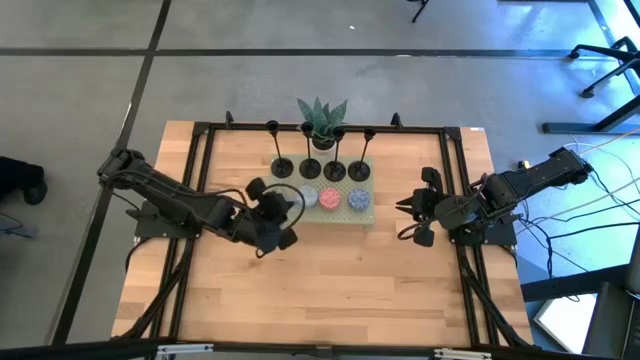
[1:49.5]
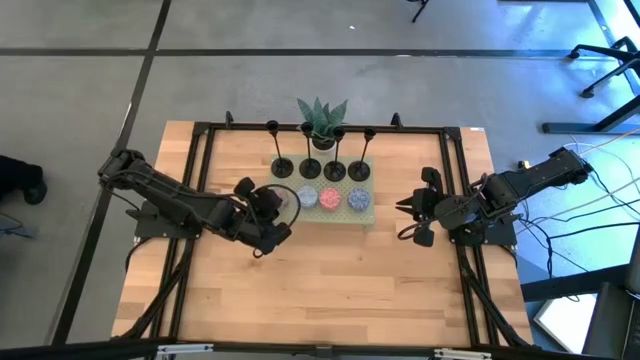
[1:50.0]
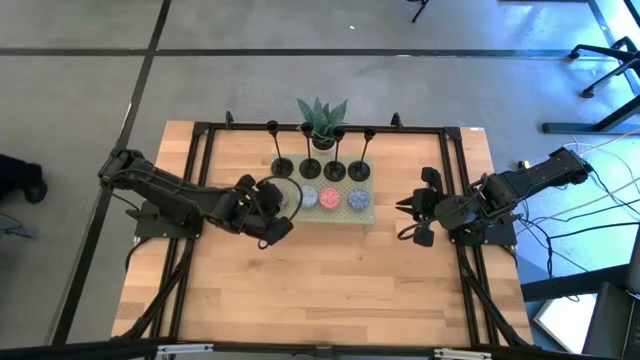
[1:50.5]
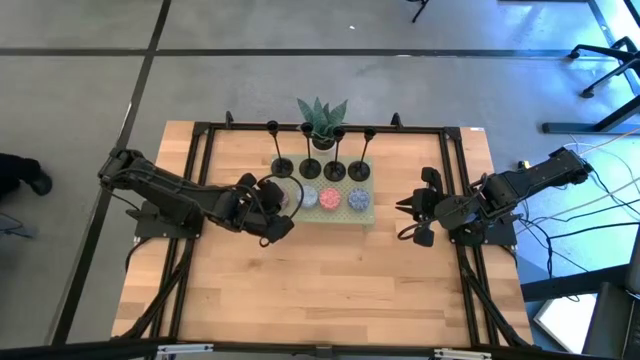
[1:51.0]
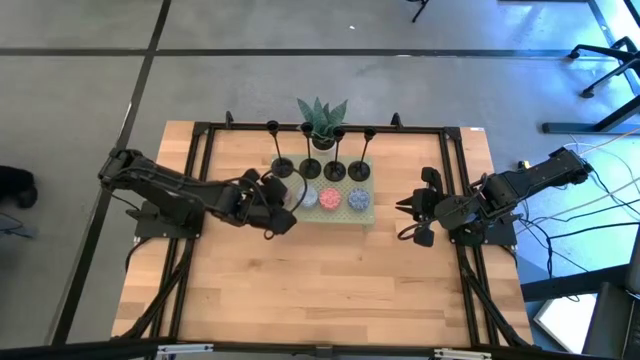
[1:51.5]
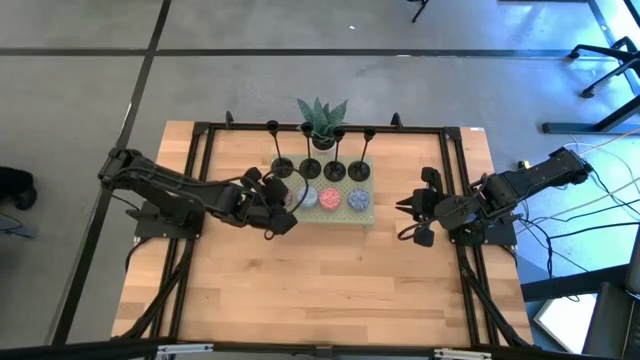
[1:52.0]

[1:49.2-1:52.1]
Task: Pick & Place candle stick holders
Adjust the red scented candle on the shelf

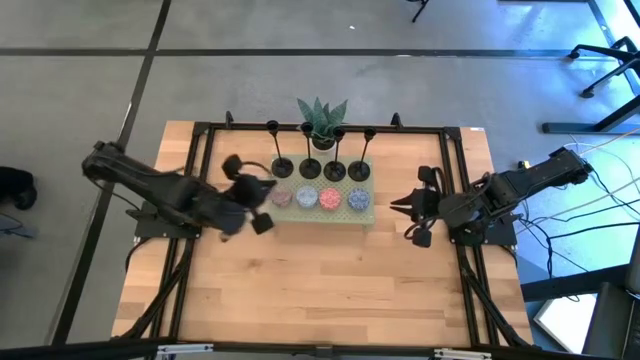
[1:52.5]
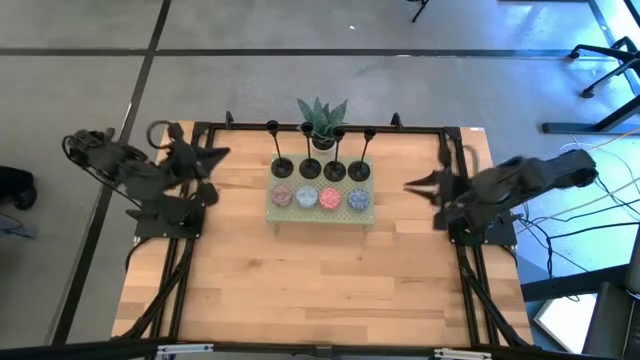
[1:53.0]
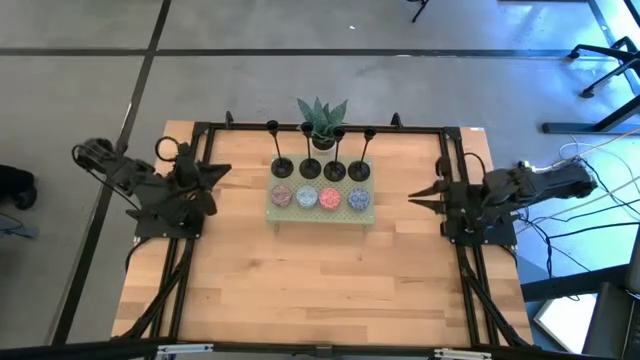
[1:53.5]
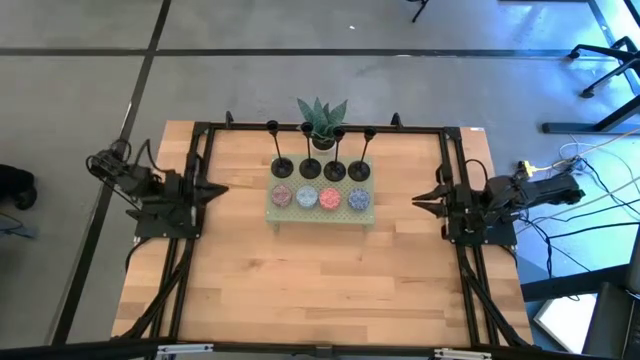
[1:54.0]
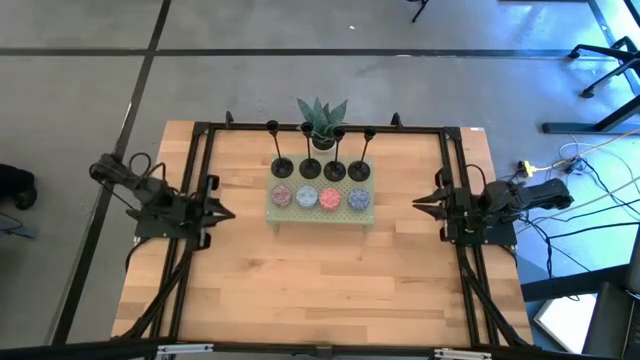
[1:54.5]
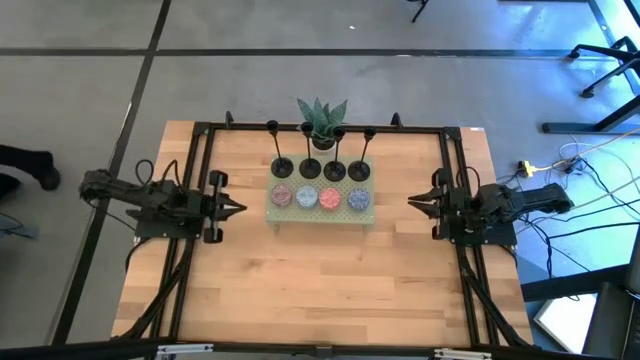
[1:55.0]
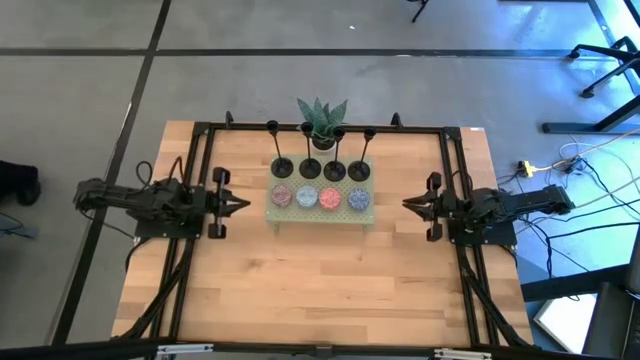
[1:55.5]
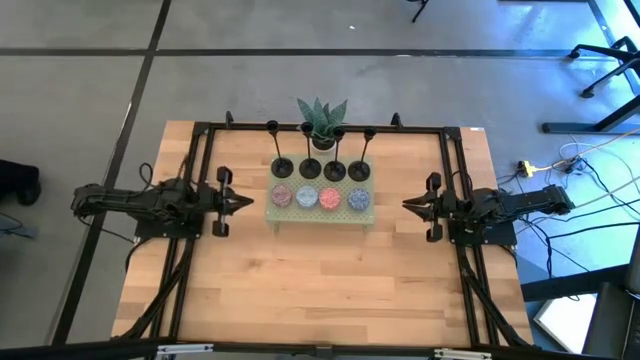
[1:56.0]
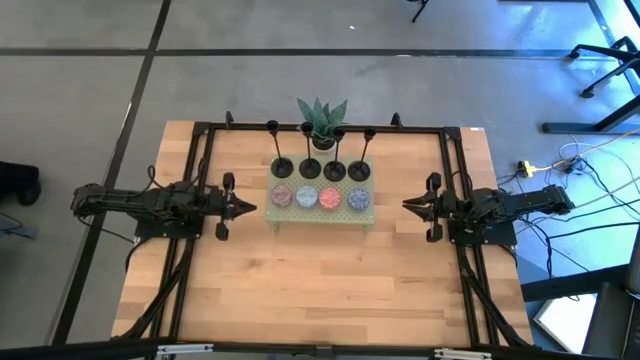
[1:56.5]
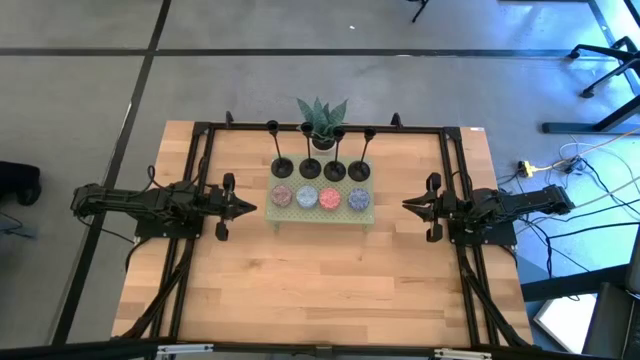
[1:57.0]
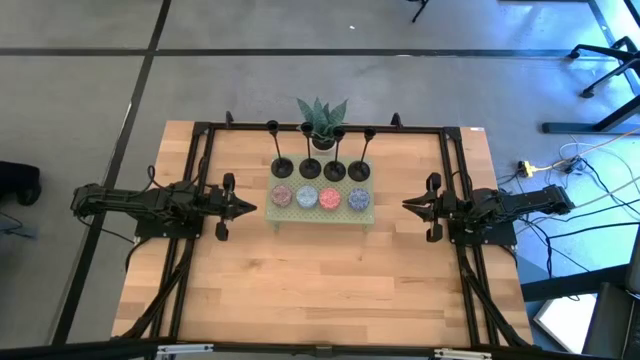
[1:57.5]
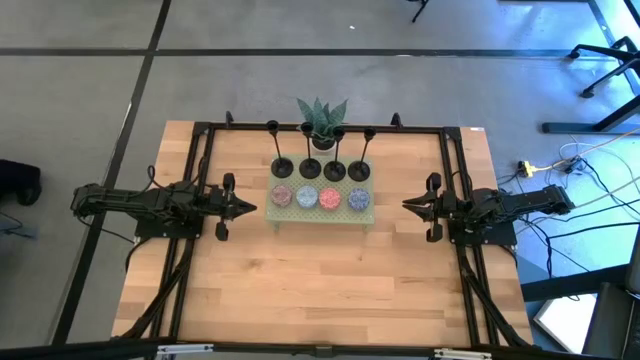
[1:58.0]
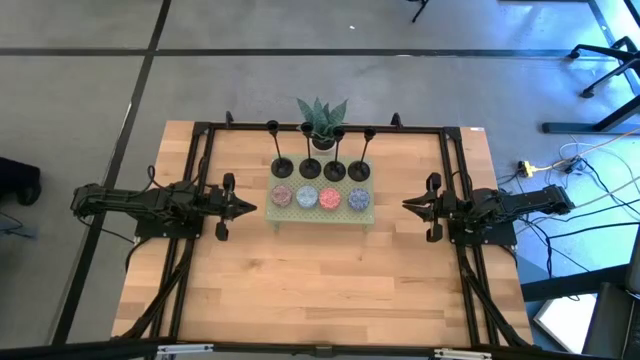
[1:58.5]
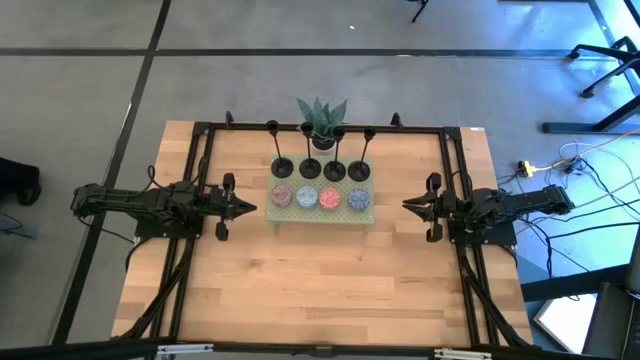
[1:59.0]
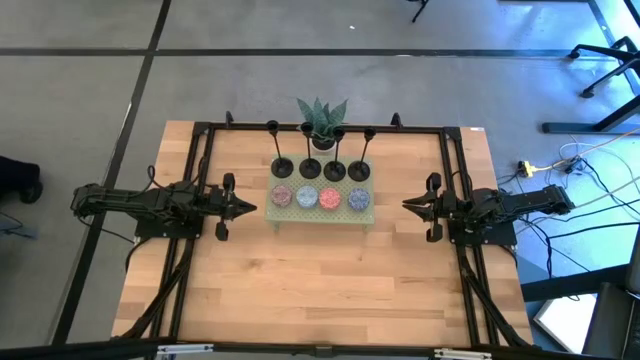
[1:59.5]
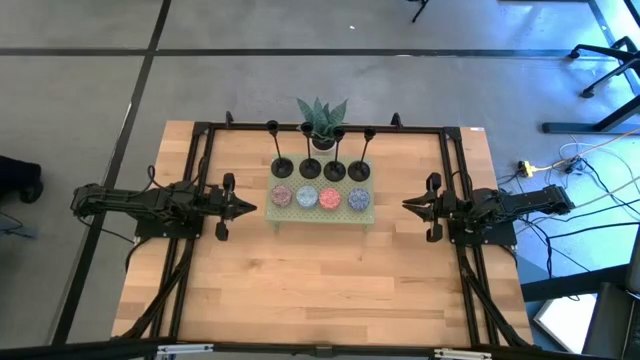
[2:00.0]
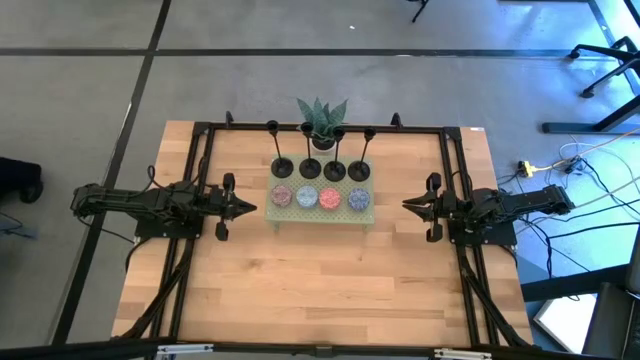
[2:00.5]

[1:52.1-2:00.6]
Return to Home Position

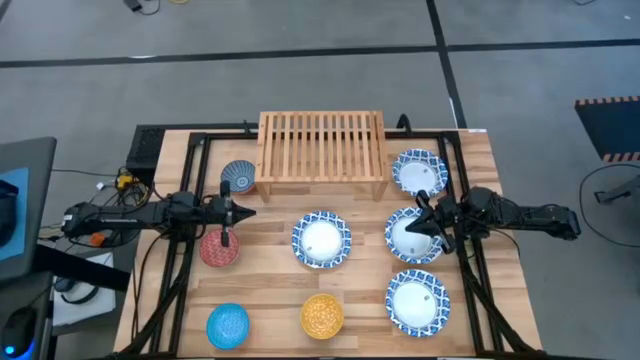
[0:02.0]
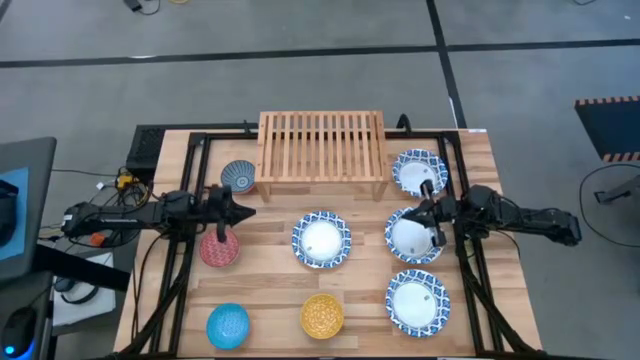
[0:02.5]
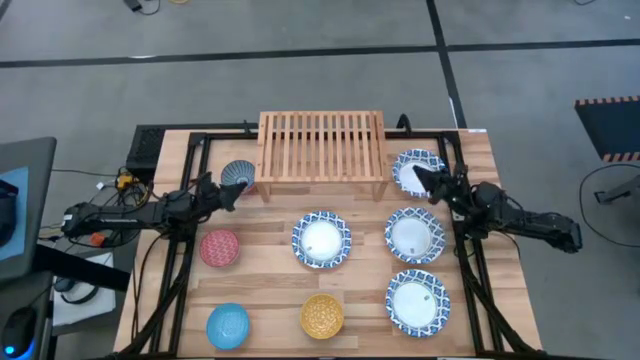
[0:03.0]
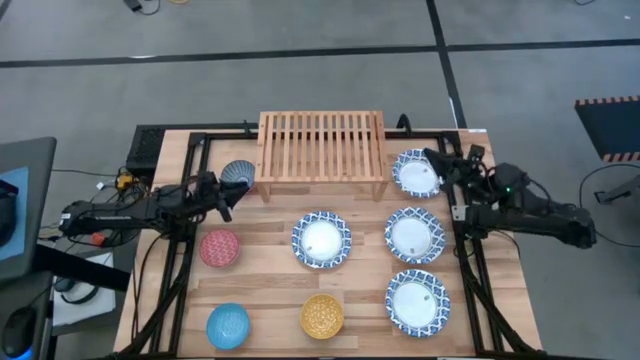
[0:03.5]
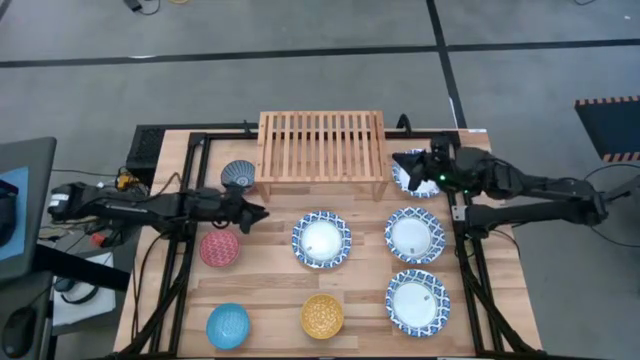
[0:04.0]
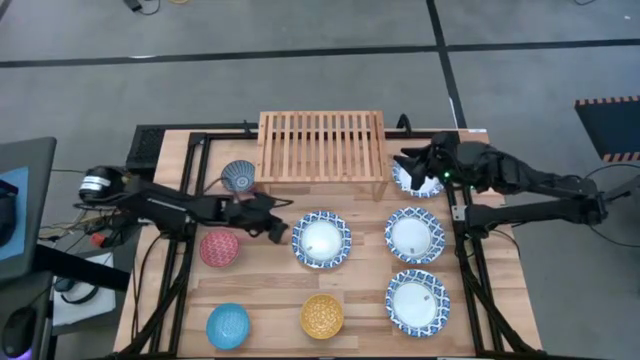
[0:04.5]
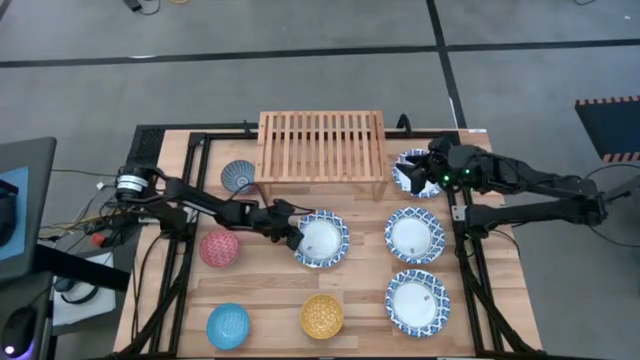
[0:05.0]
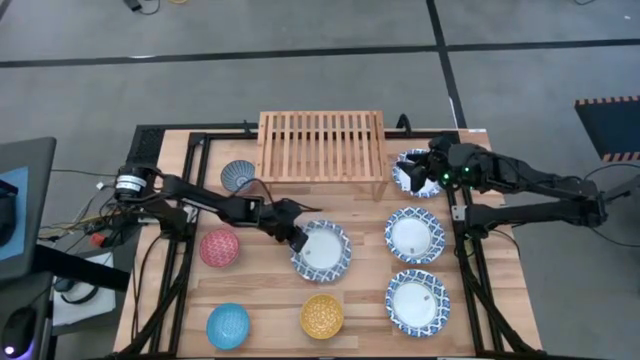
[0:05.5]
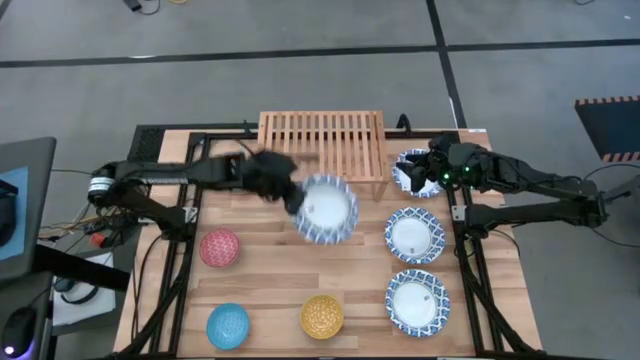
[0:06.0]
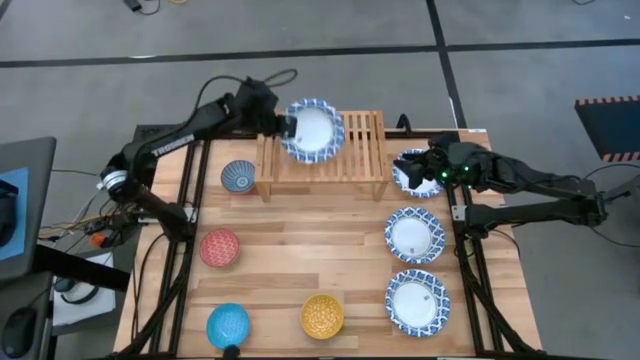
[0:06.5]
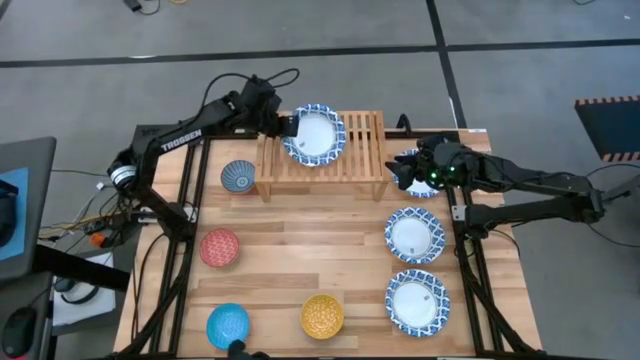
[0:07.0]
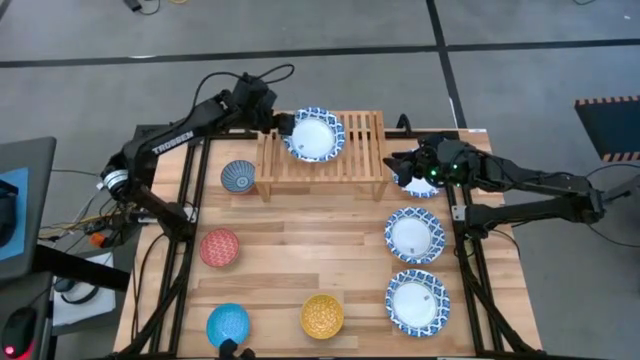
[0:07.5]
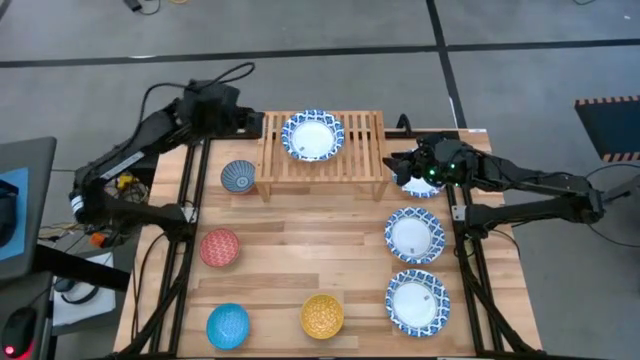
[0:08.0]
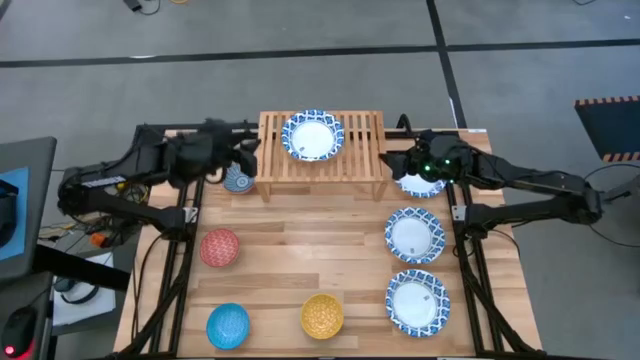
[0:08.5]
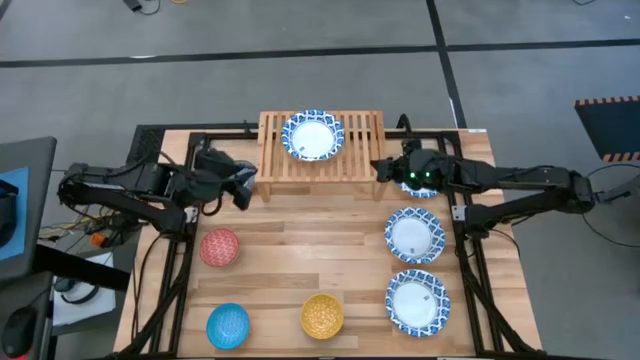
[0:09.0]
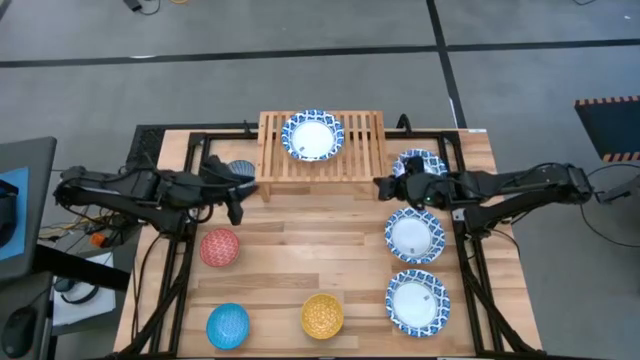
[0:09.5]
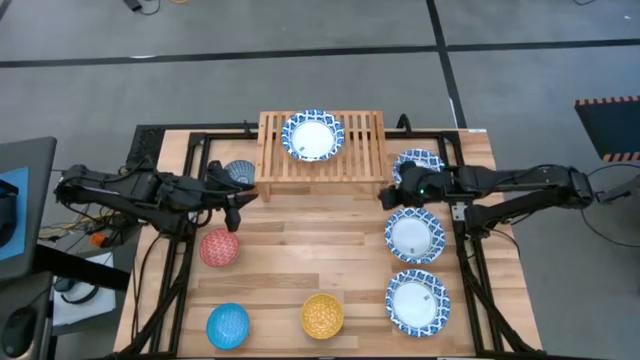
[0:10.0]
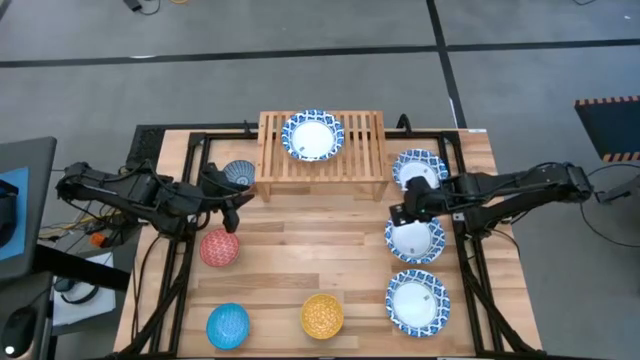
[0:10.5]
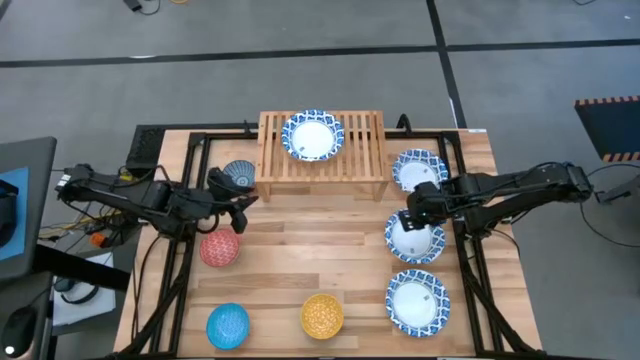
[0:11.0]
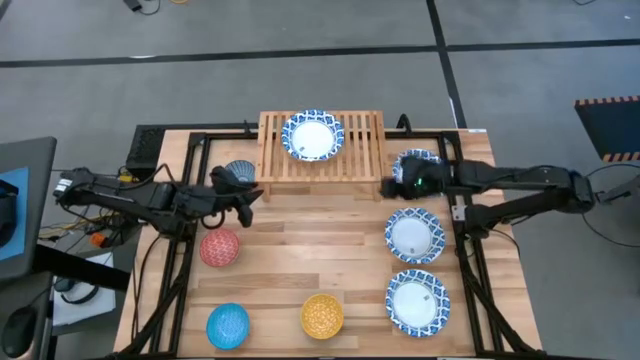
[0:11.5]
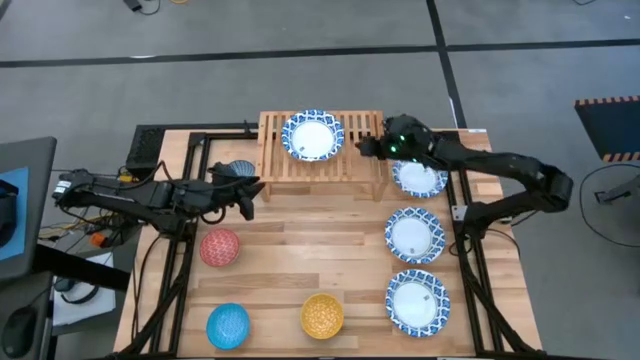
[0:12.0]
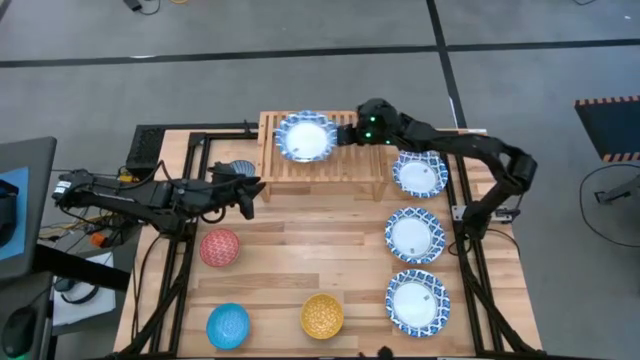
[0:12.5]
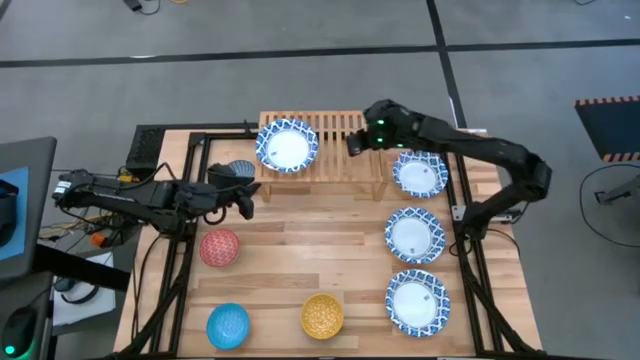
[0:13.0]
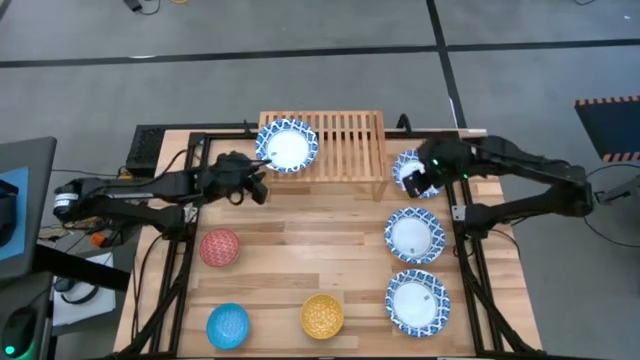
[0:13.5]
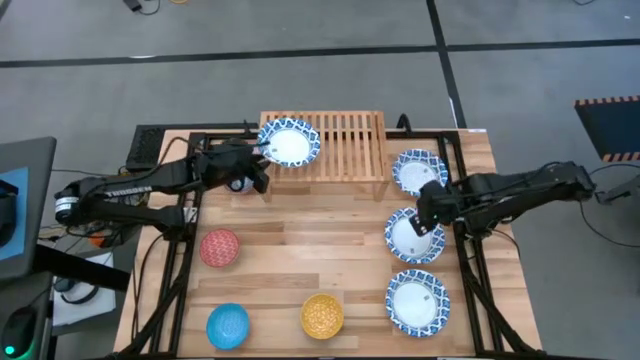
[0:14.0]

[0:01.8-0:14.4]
Task: Place and stack bowls onto a shelf
Put the white bowl on the shelf
